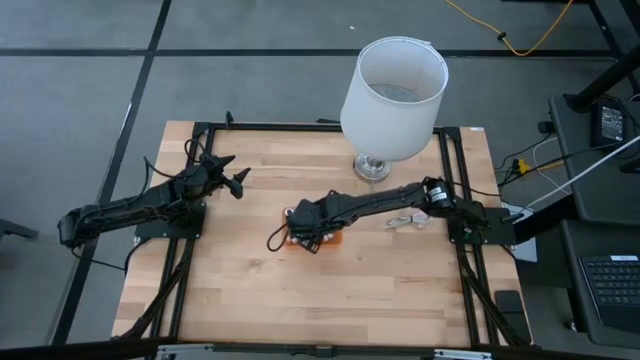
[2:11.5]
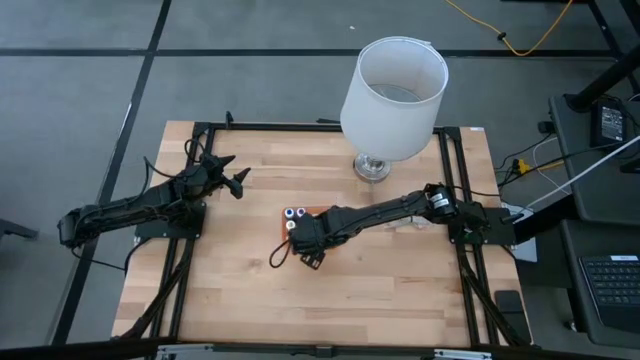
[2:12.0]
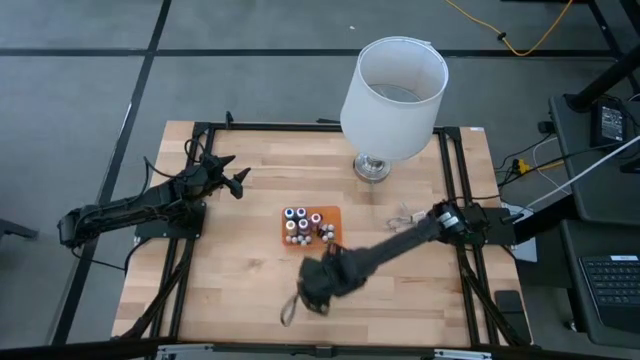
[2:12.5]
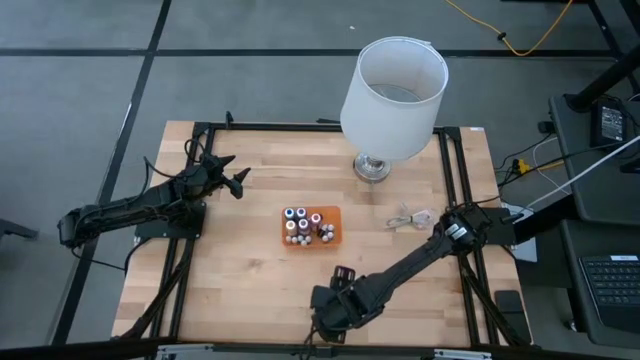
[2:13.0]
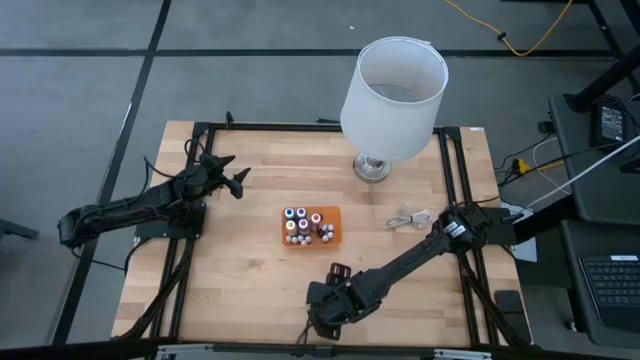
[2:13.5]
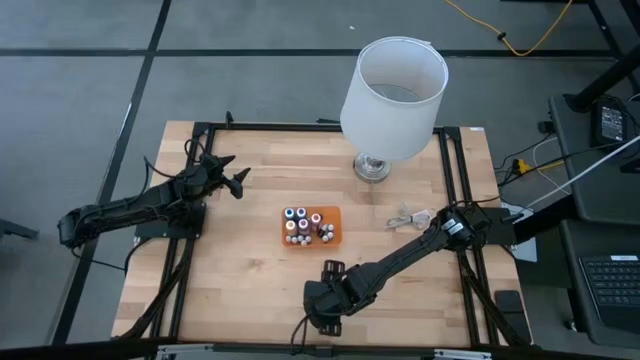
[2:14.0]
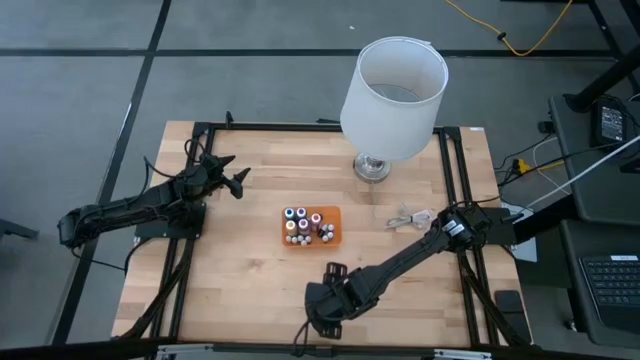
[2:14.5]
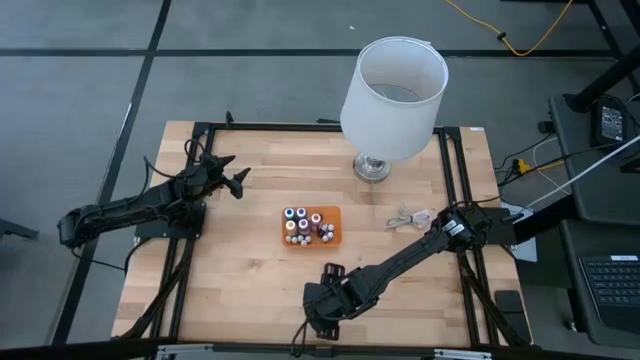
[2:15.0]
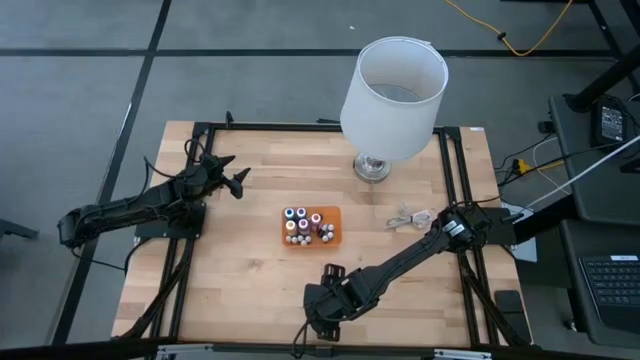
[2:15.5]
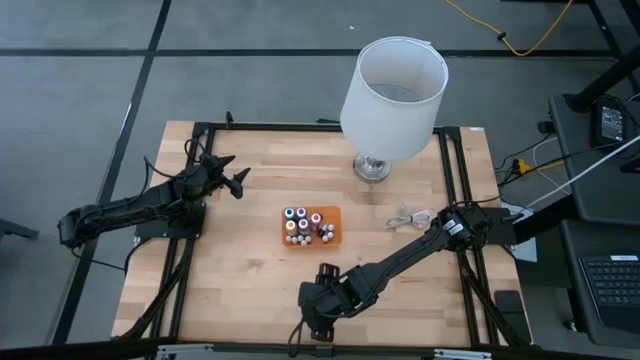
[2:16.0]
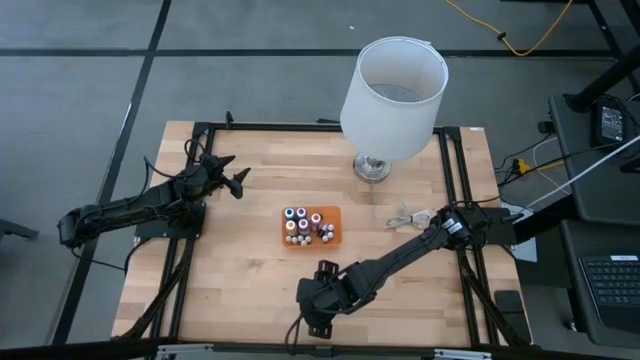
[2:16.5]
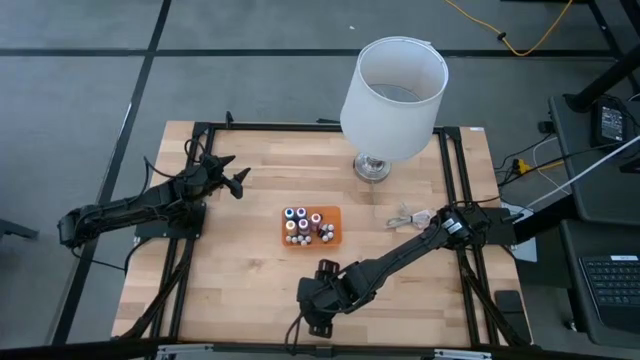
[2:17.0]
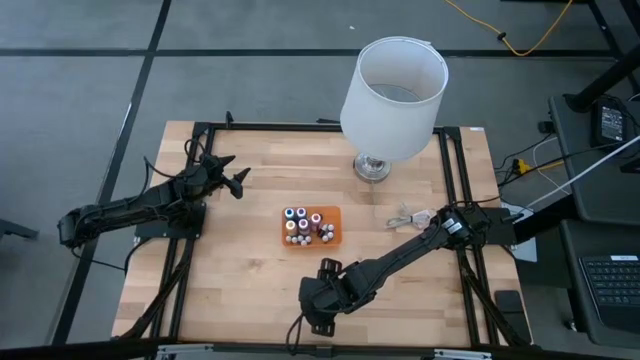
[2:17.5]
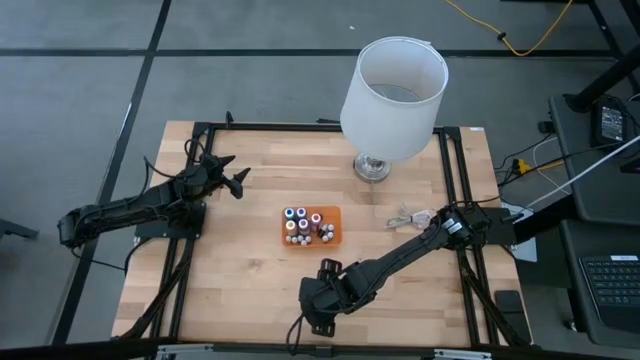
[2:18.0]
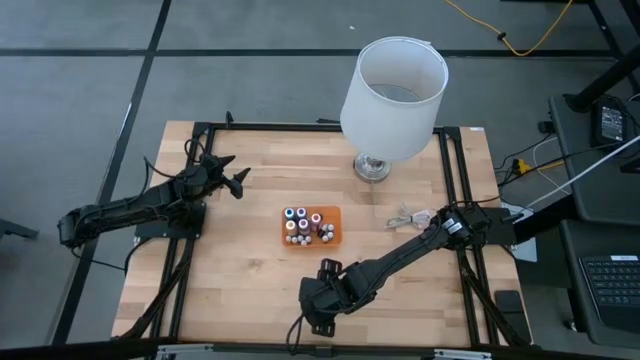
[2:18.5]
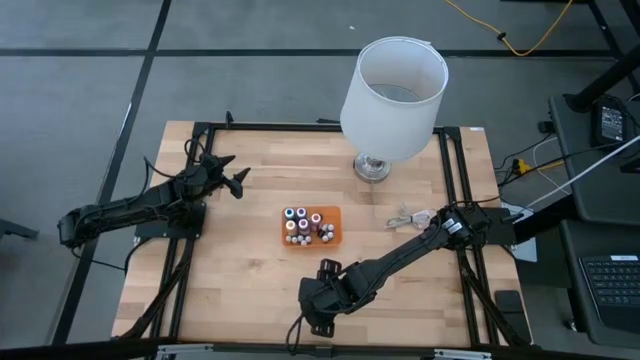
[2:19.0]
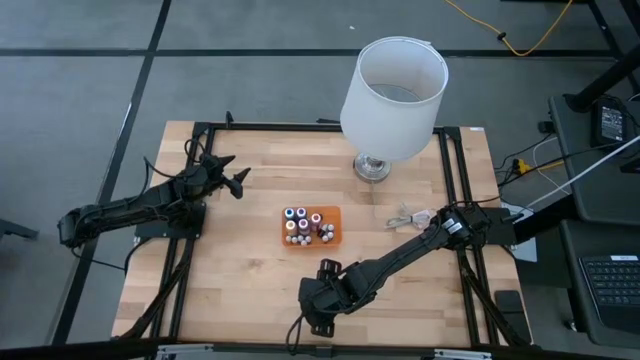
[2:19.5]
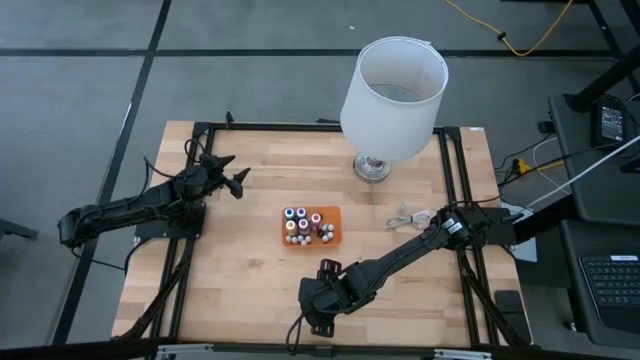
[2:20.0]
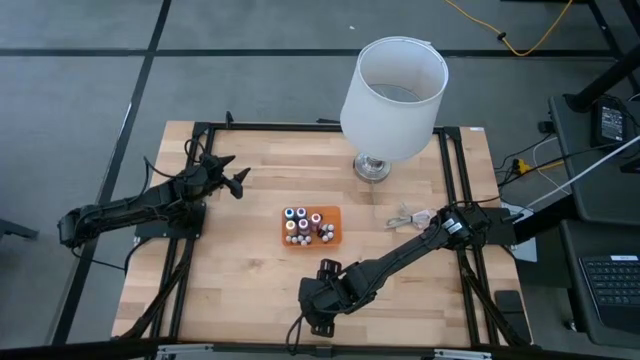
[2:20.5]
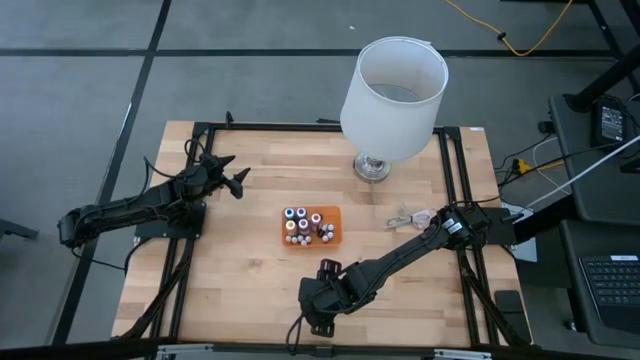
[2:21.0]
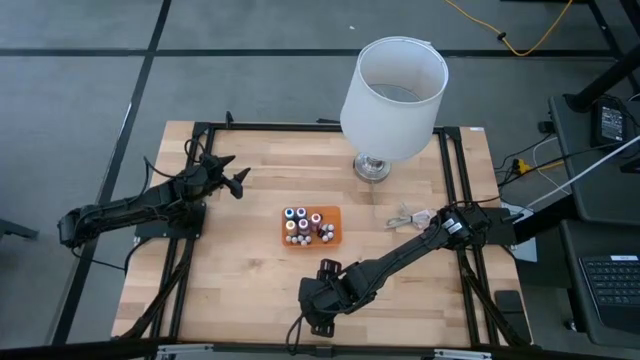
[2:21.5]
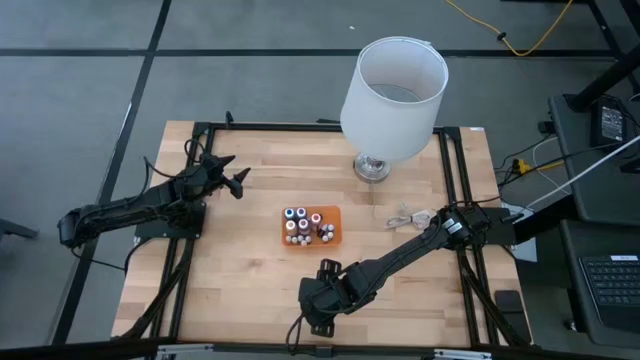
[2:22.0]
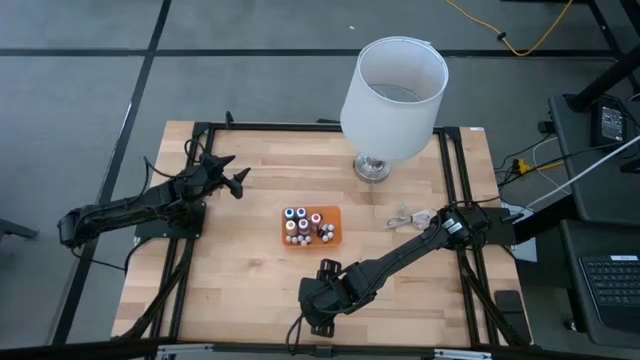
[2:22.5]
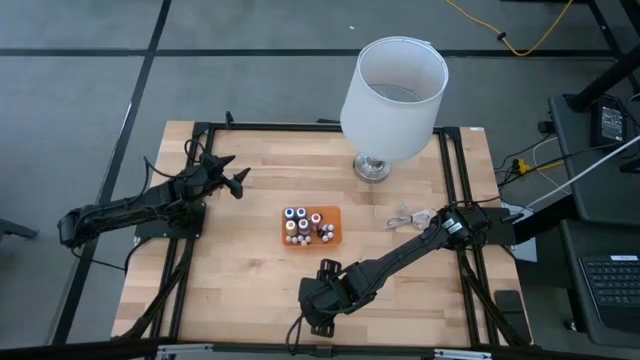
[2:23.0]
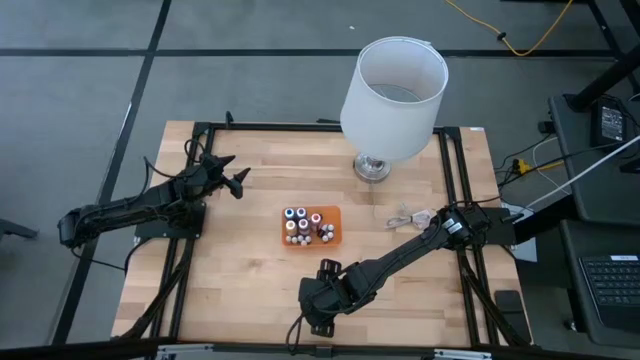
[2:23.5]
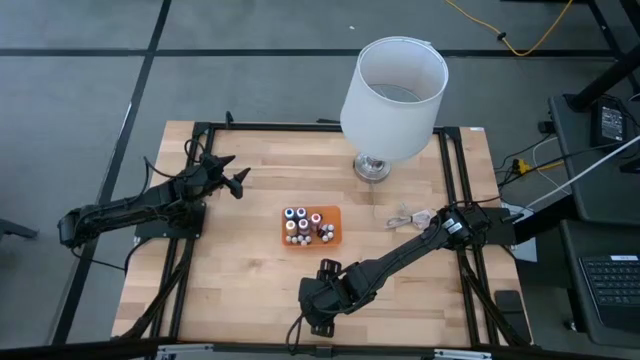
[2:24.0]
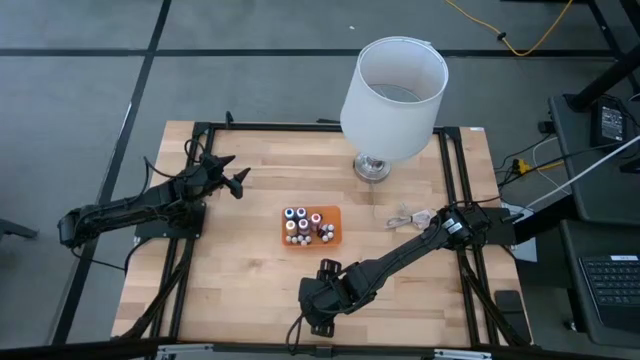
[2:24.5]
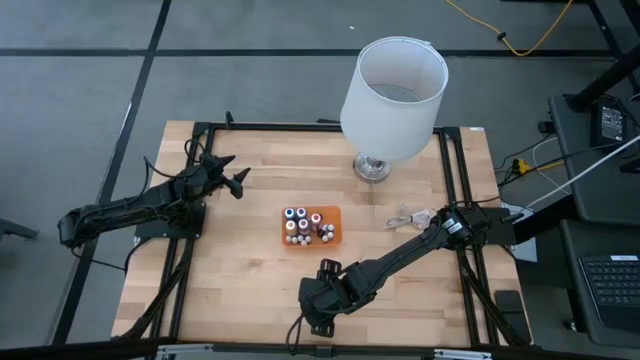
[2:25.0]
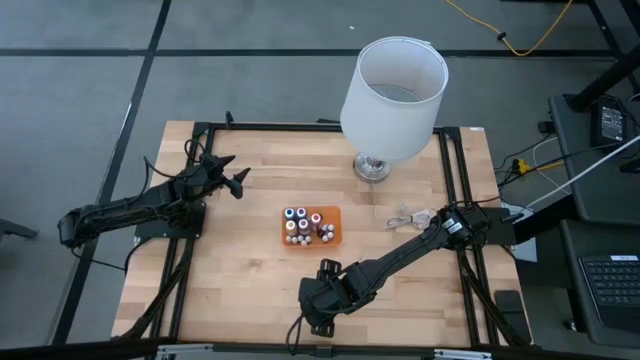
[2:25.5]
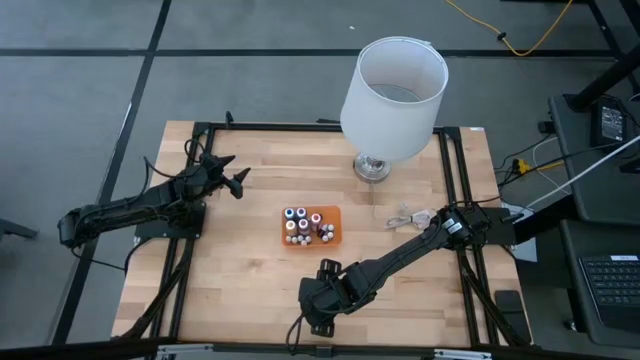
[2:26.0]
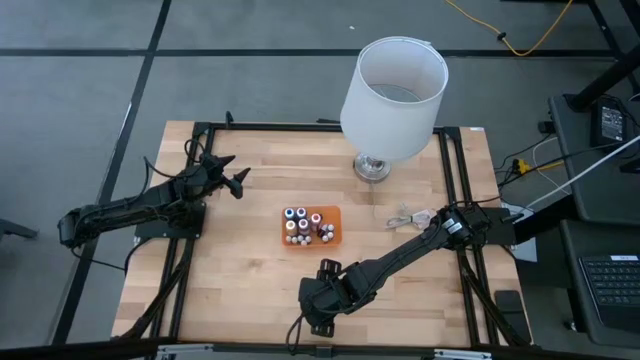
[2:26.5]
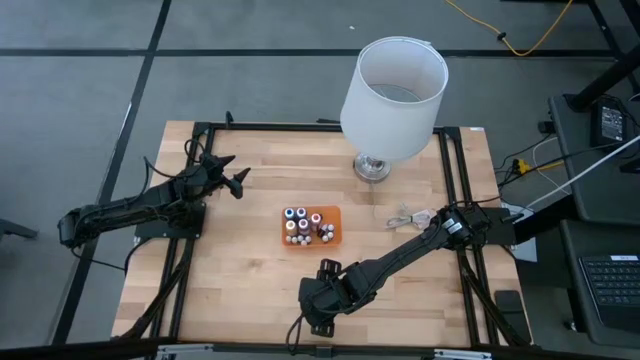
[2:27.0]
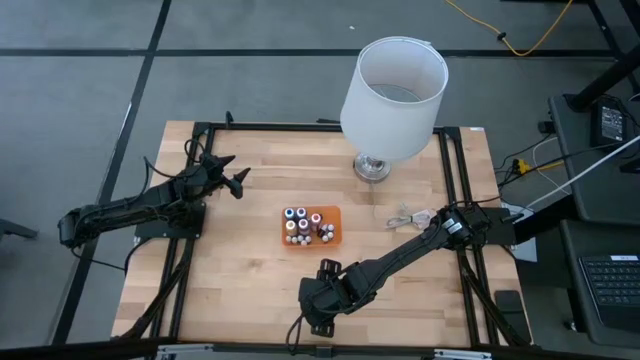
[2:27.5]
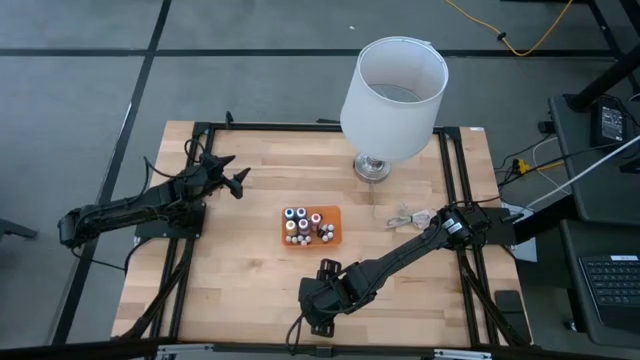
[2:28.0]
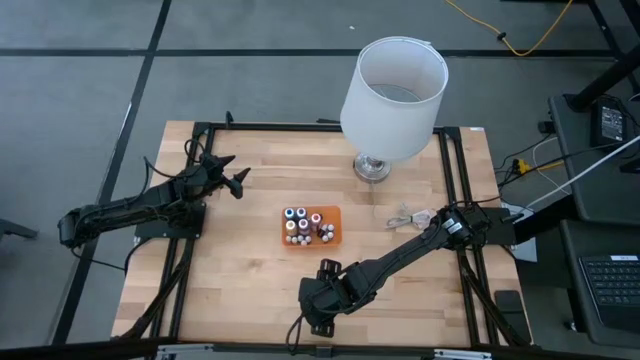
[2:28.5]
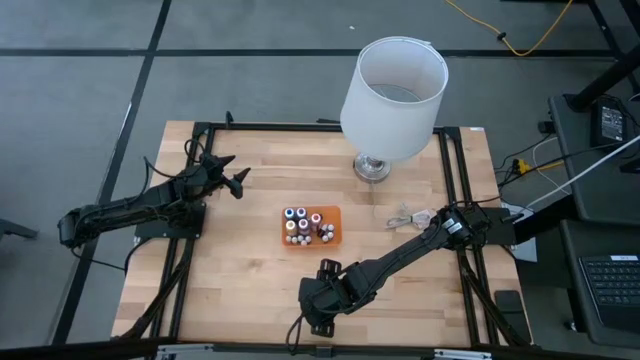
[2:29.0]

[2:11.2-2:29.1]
Task: Pick & Place food coloring
Return to Home Position
